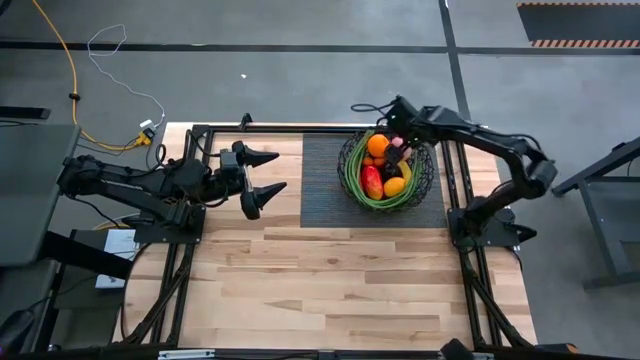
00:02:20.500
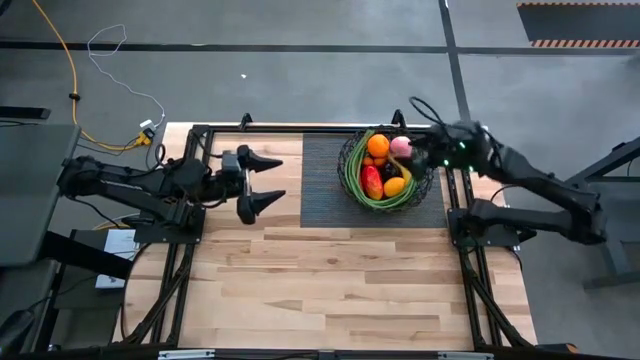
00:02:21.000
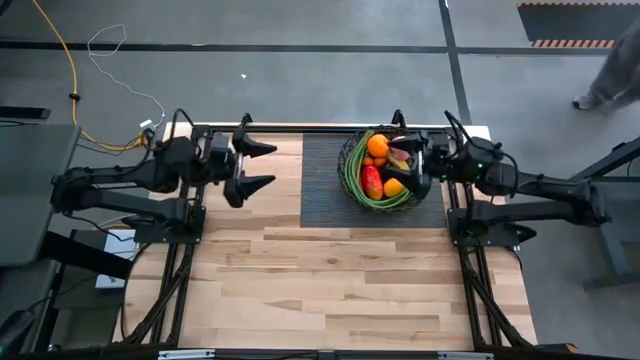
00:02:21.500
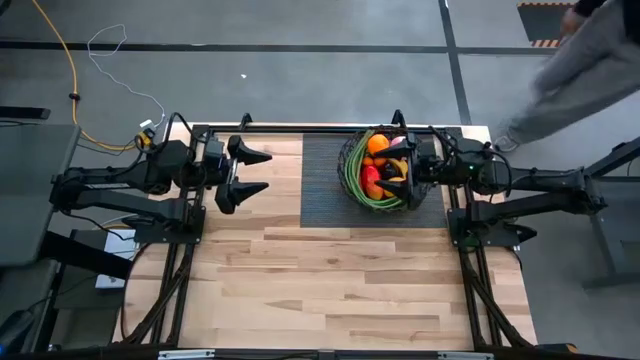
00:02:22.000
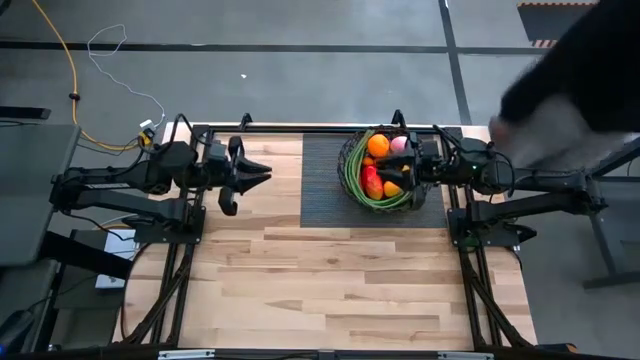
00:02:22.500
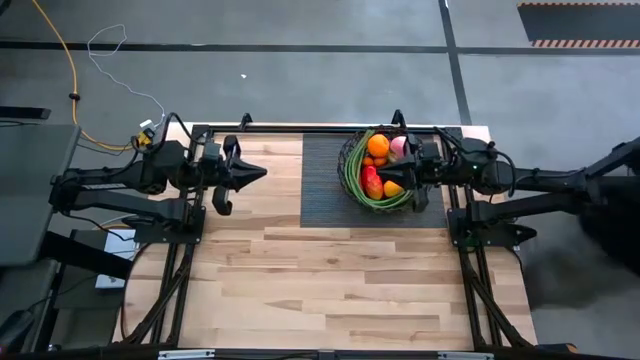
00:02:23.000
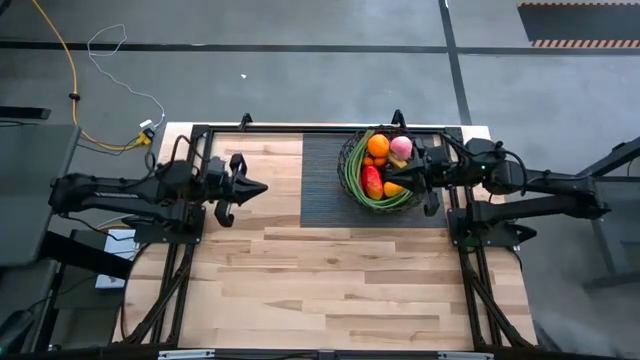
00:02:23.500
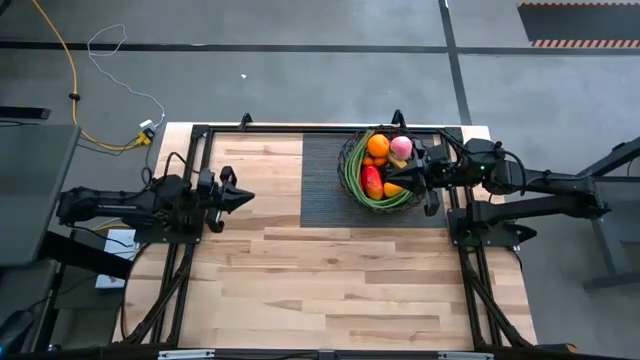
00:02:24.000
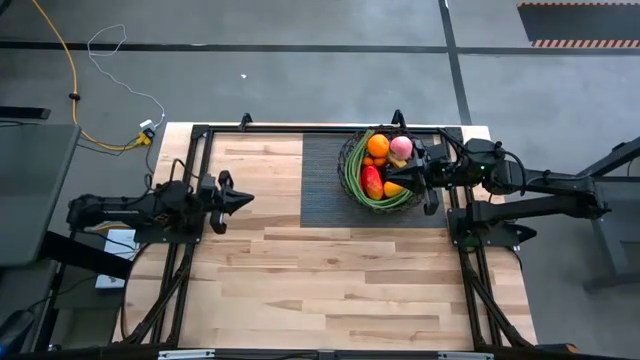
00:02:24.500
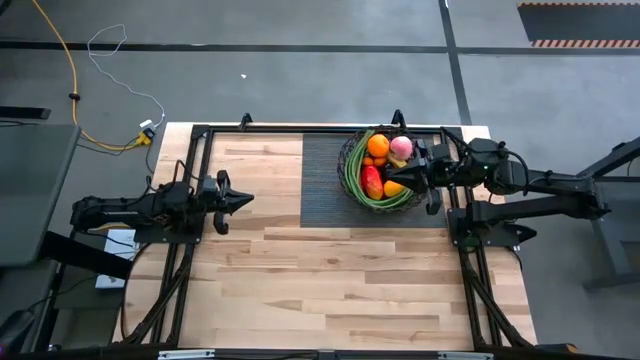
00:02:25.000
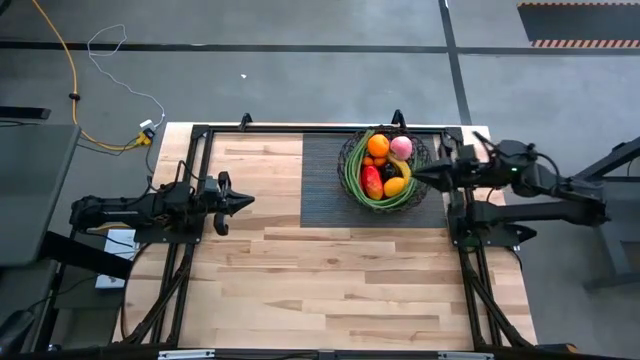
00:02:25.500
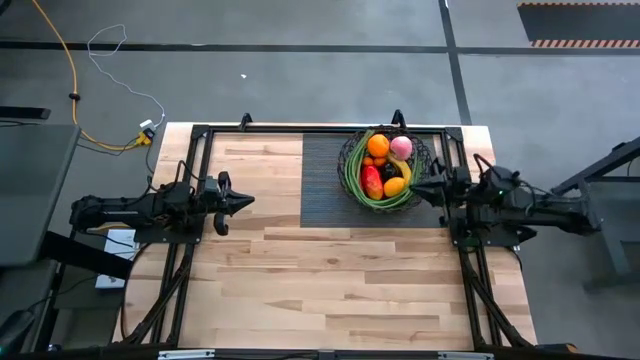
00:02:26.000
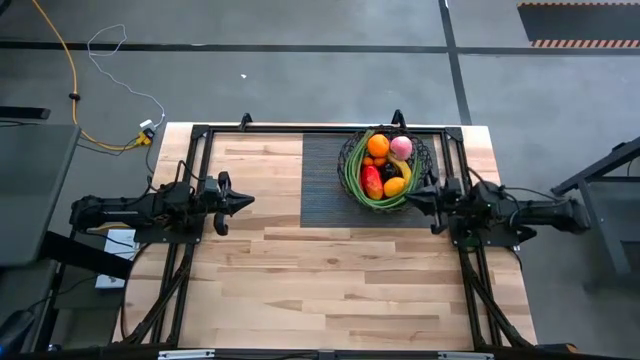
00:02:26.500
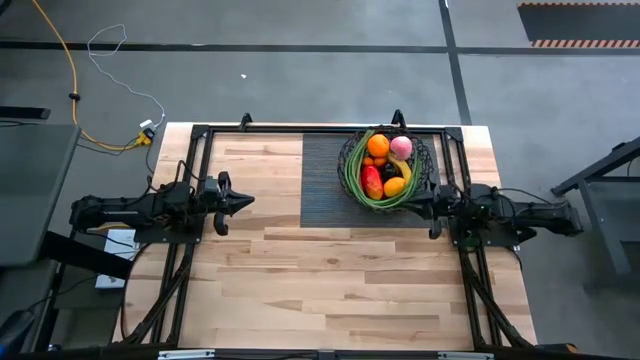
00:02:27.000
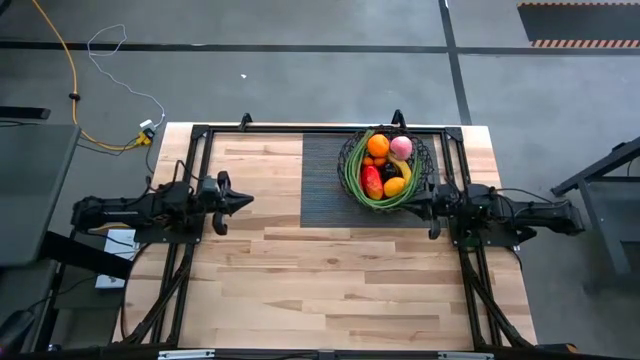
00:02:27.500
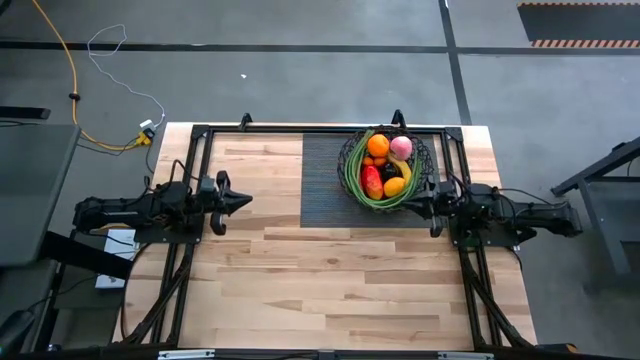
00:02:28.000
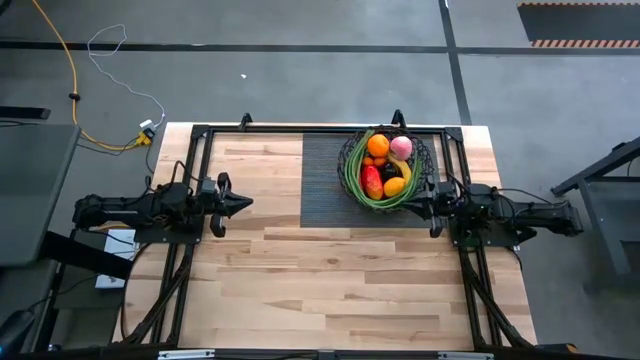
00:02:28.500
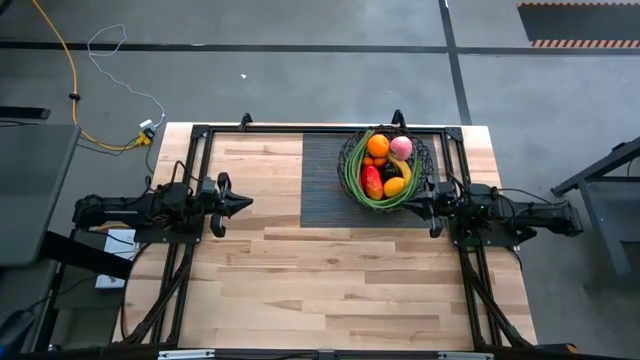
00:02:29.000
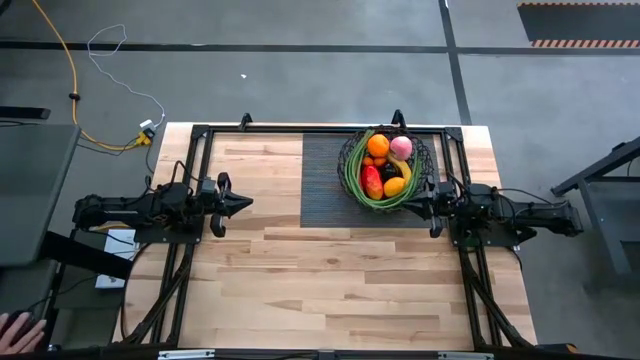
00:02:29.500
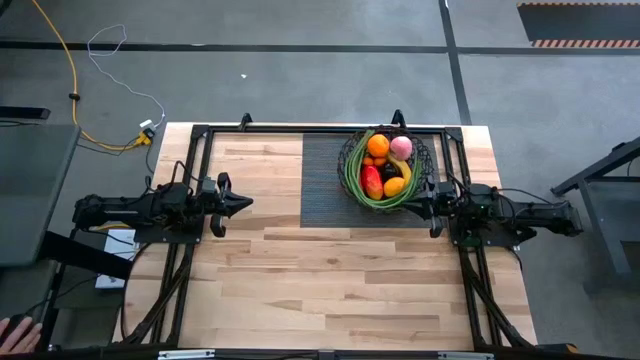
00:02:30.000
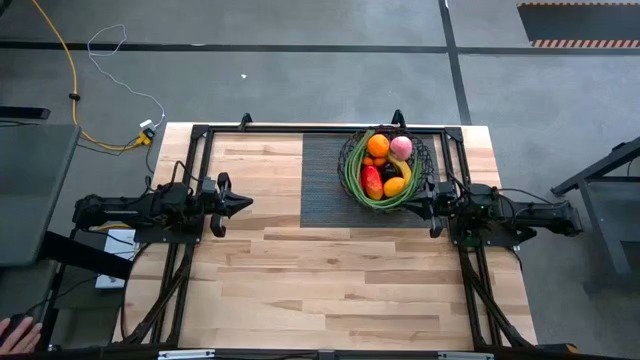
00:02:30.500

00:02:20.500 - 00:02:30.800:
Task: Build produce basket
Return to Home Position

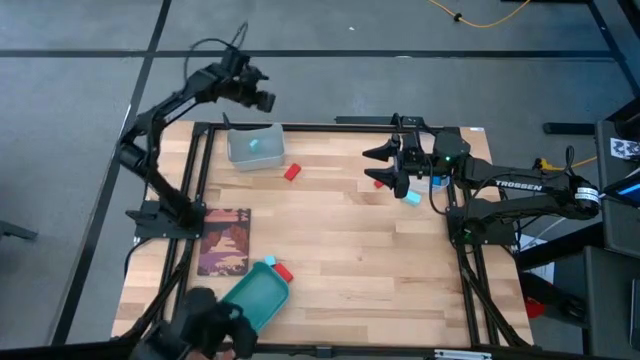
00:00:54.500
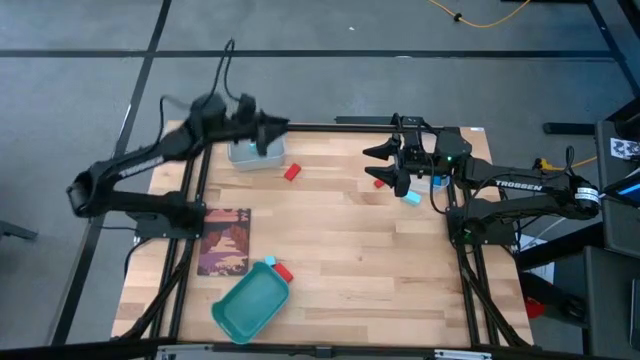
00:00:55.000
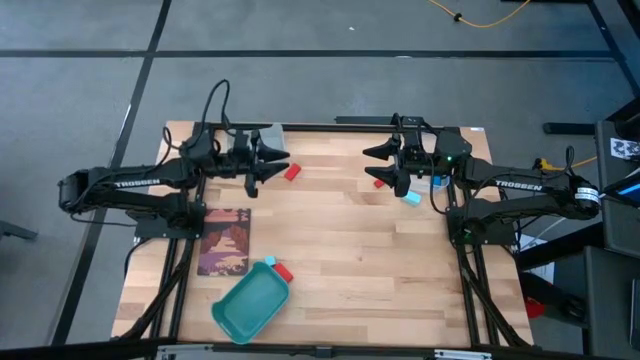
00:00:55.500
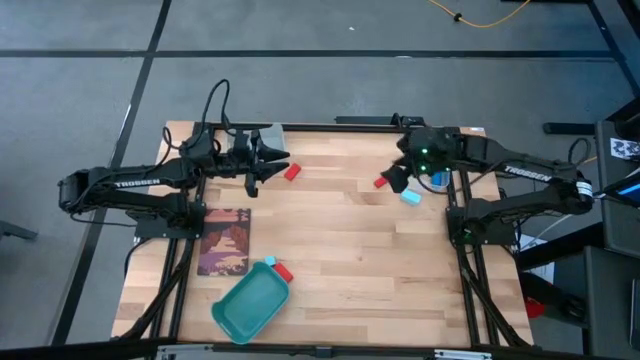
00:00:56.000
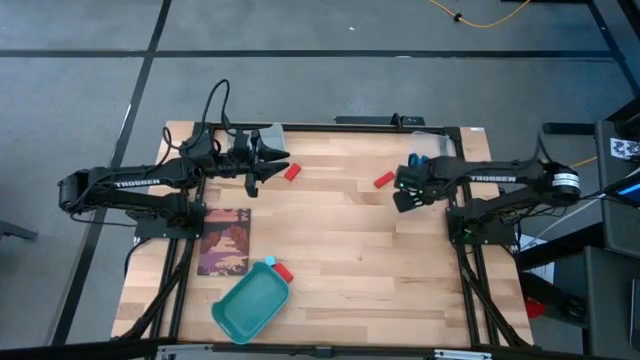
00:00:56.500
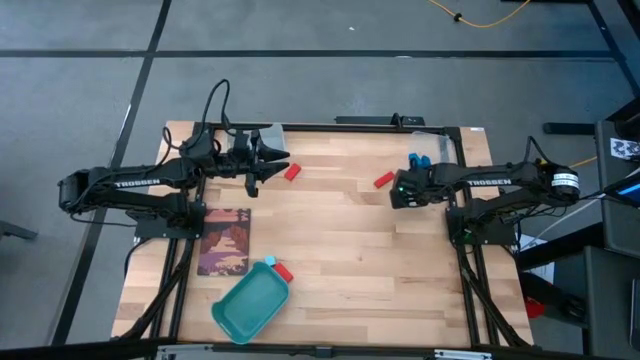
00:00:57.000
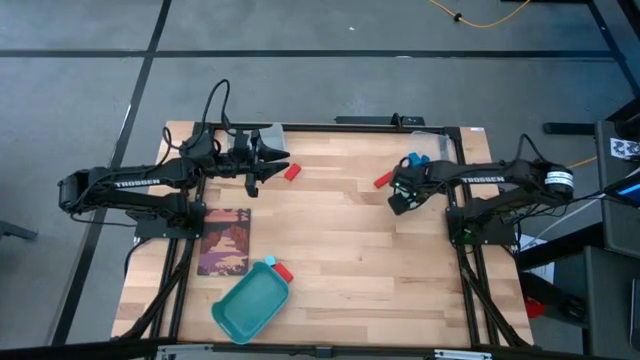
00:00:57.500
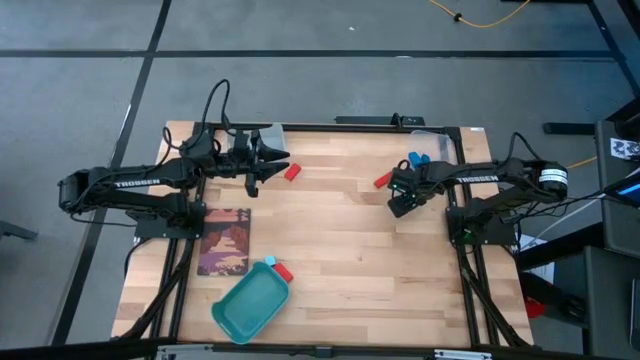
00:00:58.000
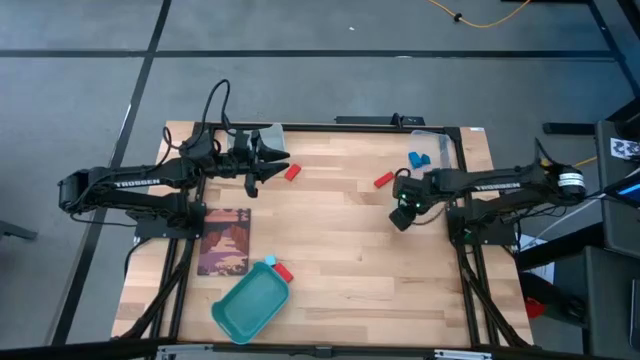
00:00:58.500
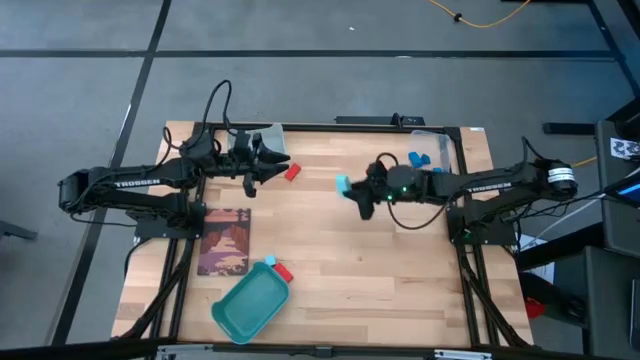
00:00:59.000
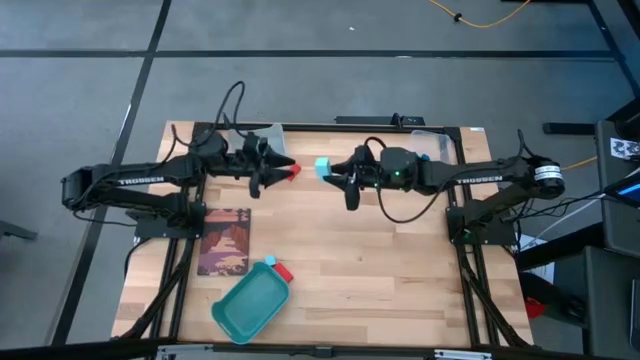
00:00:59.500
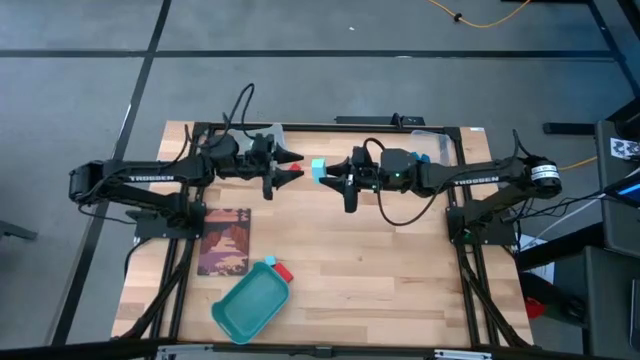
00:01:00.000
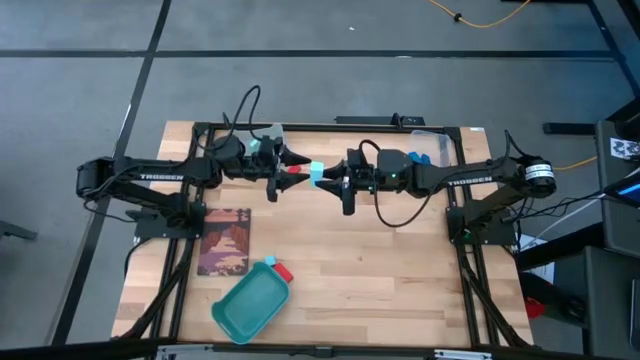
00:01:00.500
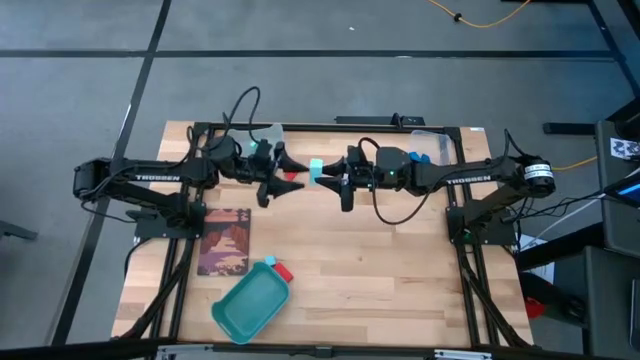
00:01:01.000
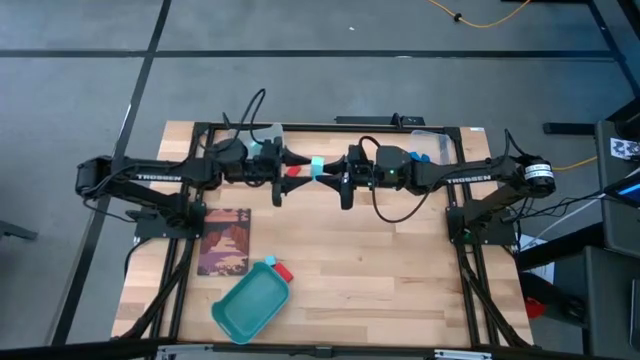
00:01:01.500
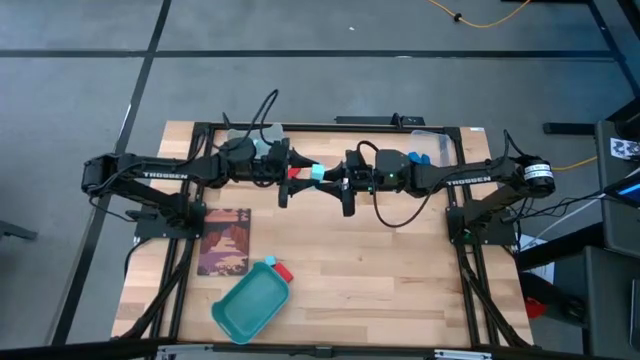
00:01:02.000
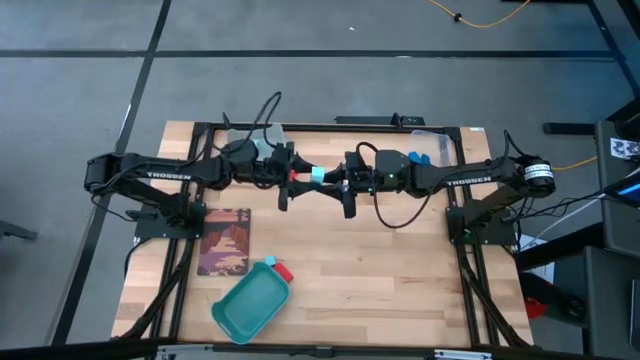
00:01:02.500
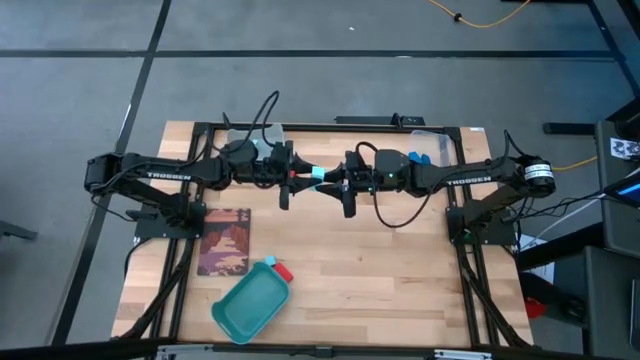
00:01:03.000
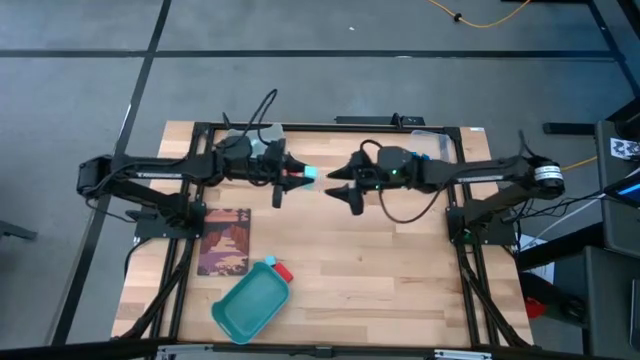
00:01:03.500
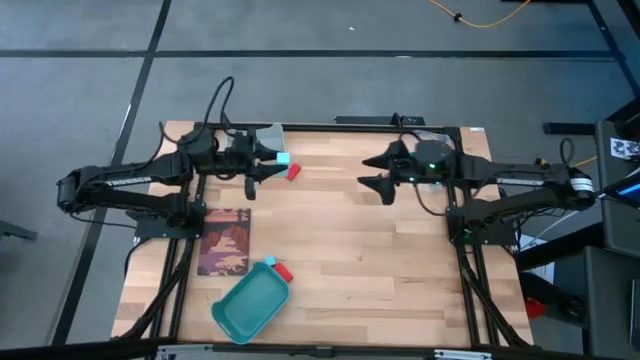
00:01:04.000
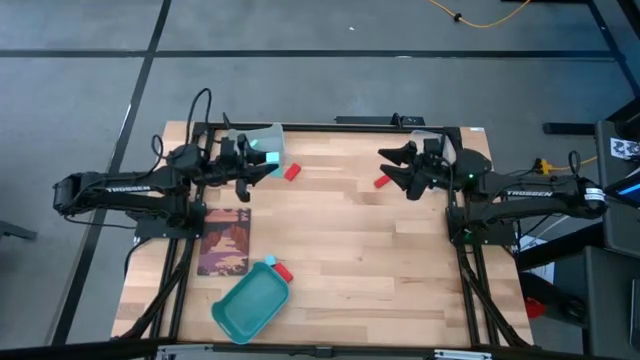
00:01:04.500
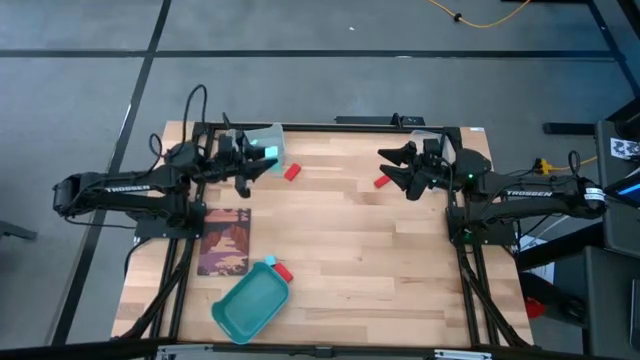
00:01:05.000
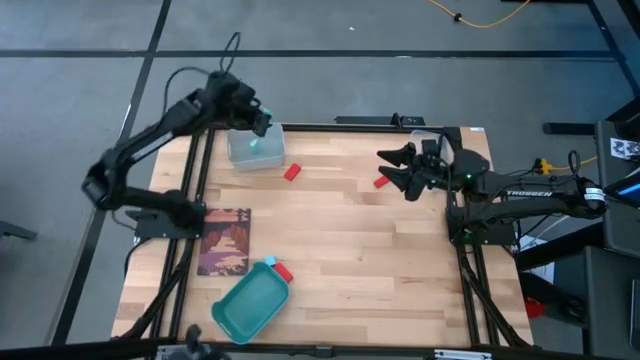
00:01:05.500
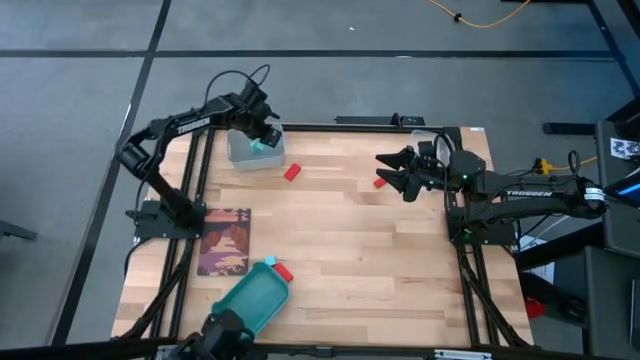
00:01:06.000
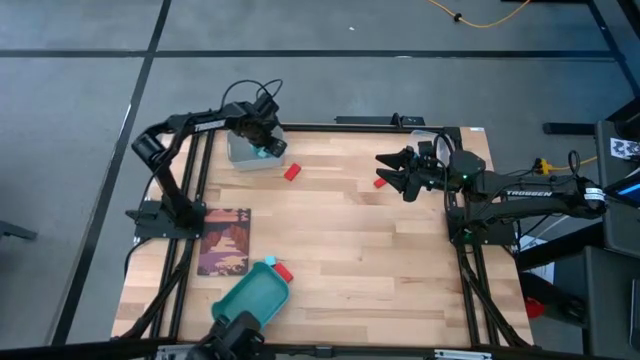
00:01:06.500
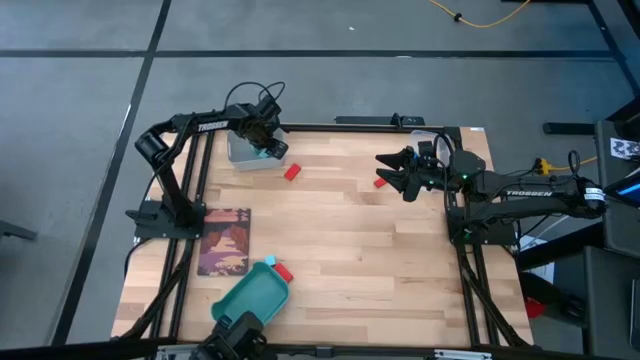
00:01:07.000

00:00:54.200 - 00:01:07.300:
Task: Sort & place blocks by color
Put the right light blue block into the gray bin
